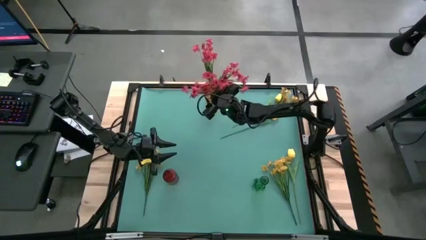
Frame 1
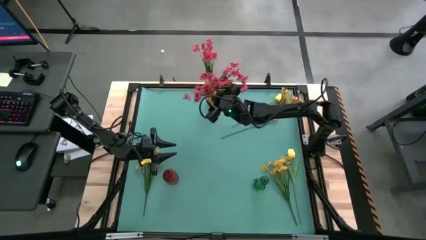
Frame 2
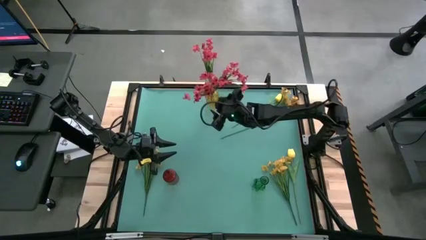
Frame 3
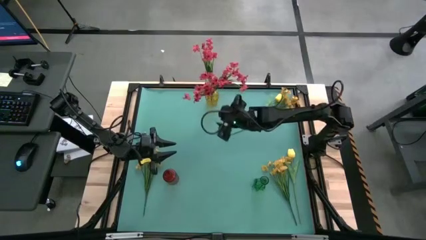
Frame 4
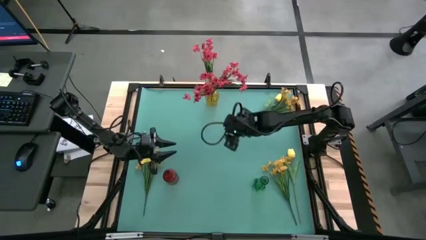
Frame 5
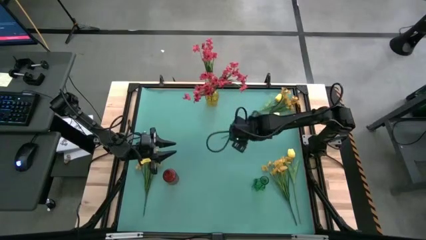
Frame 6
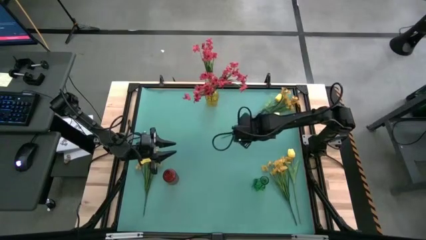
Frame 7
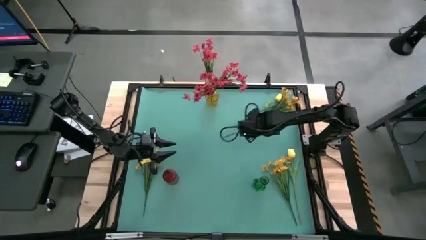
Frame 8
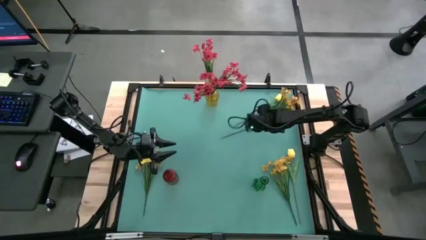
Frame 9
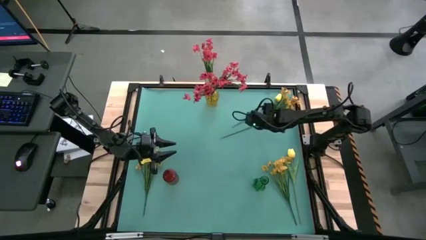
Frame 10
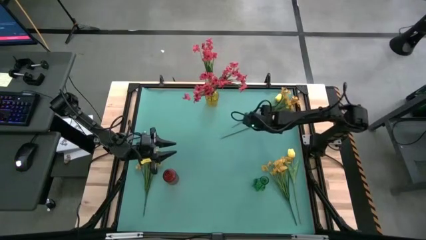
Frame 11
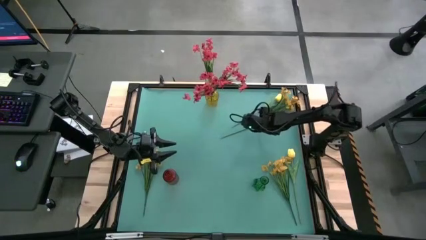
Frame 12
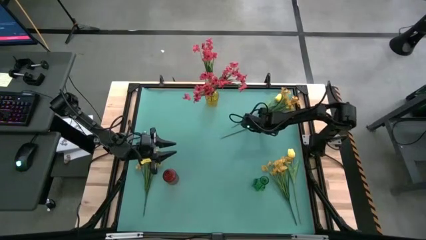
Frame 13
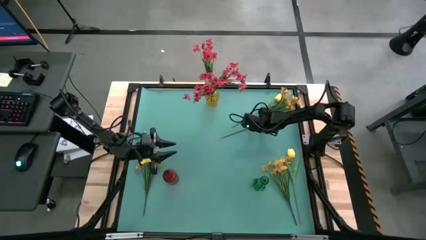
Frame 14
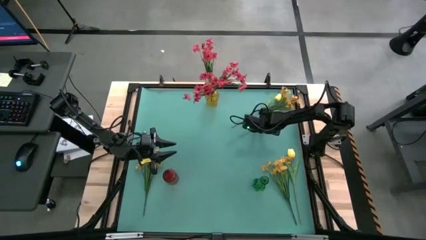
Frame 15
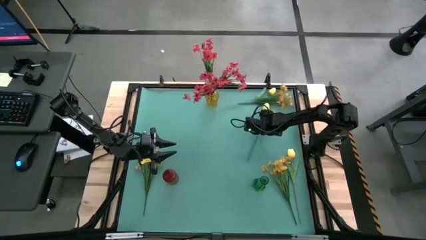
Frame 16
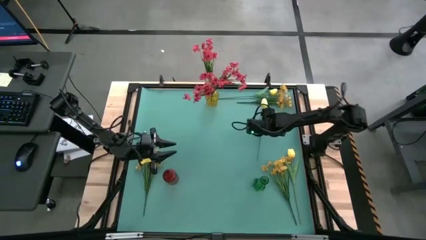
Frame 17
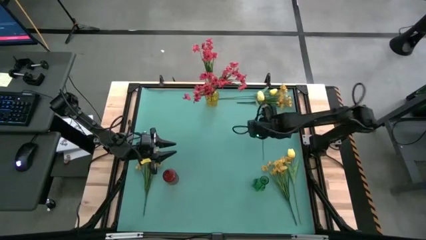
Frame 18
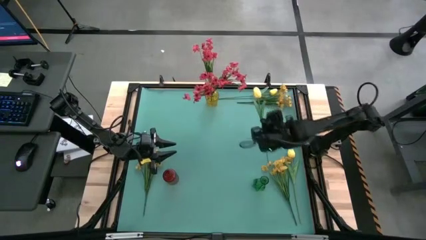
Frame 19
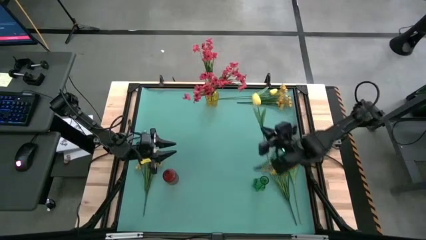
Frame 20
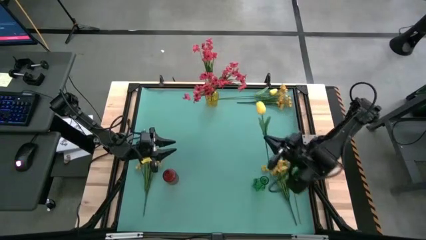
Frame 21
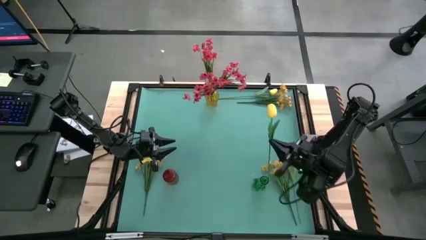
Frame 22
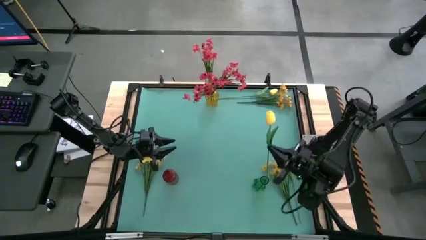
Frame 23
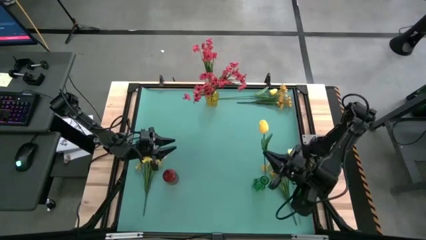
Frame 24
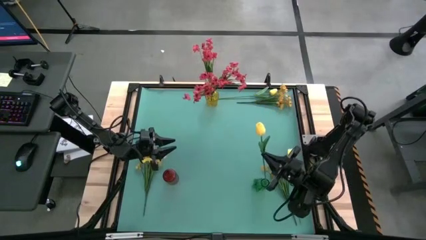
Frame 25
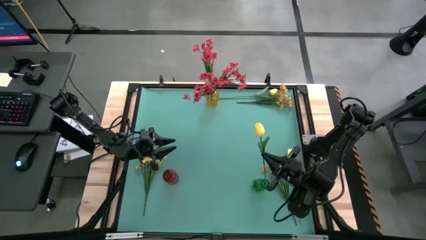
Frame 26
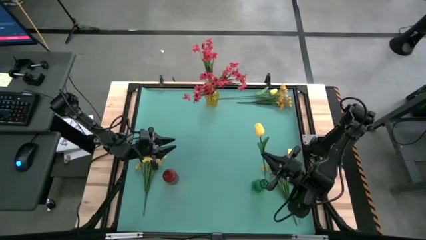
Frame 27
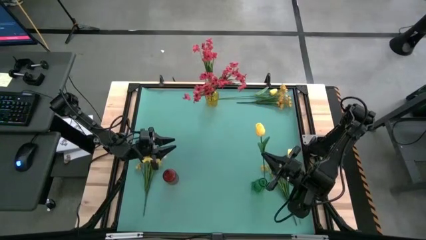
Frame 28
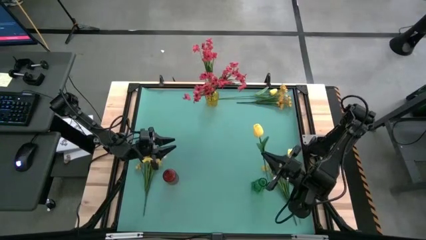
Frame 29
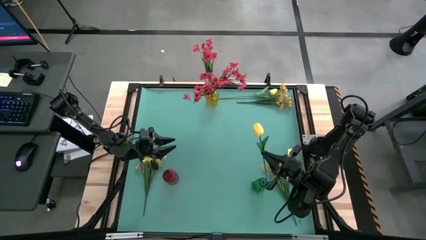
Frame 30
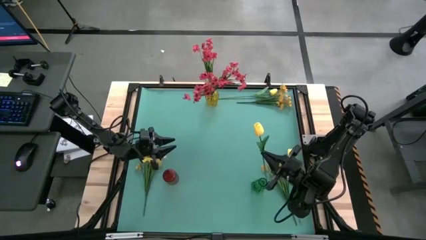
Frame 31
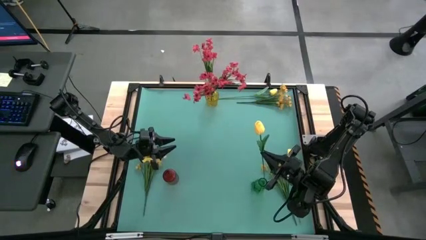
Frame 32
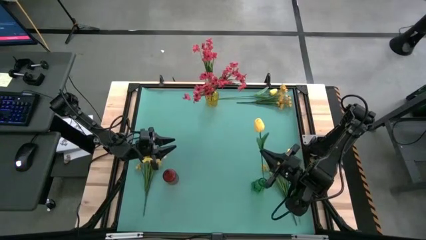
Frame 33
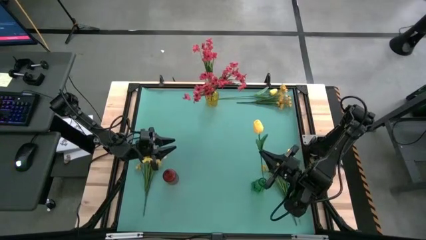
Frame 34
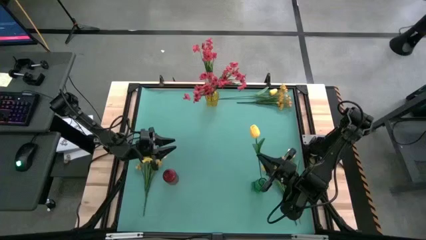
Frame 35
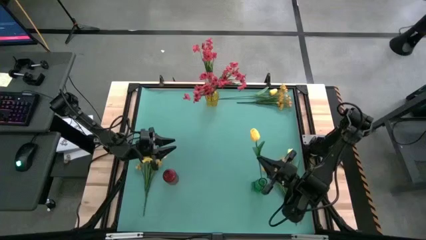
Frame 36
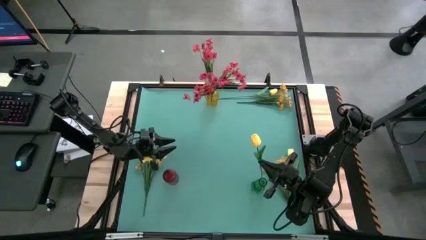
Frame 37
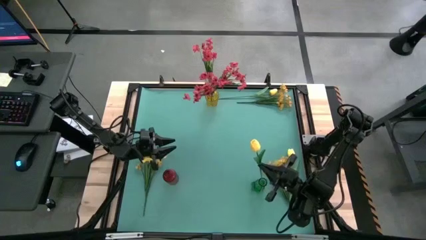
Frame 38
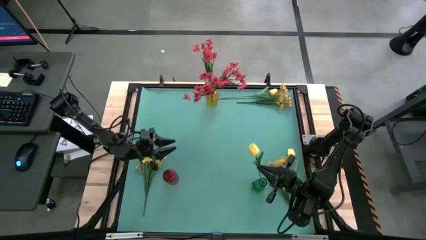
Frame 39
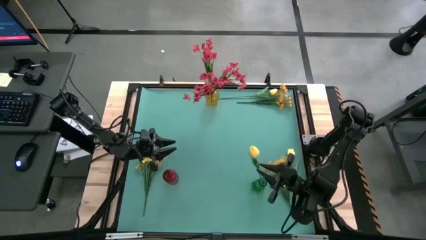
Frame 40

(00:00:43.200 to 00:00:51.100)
Task: Sort flowers into vase by color
Put the middle yellow tulip into the green vase

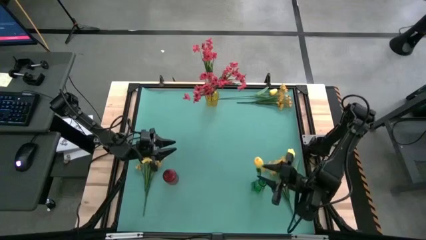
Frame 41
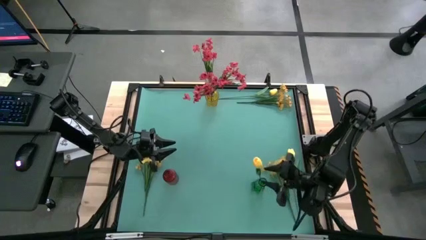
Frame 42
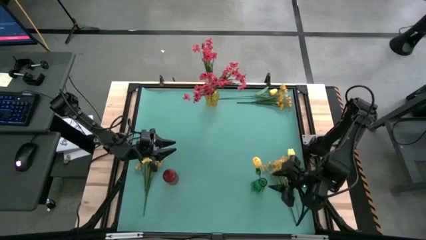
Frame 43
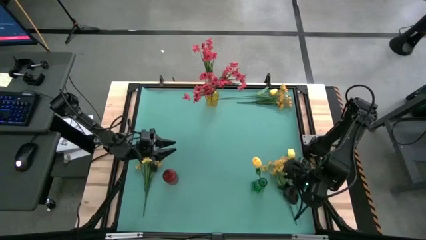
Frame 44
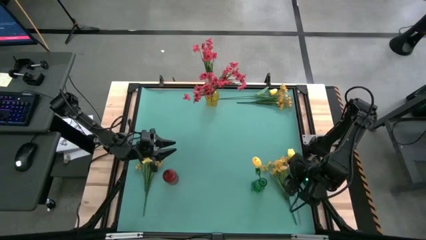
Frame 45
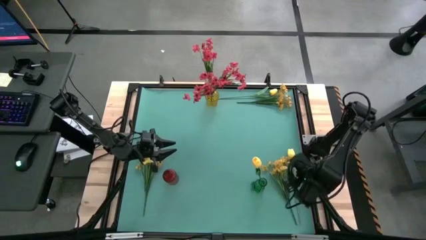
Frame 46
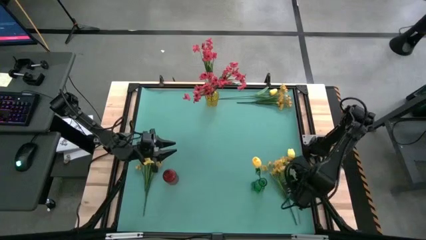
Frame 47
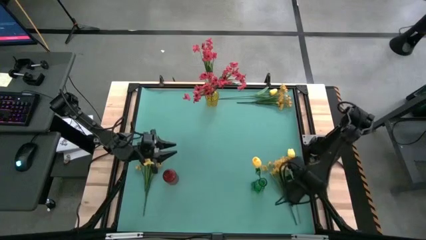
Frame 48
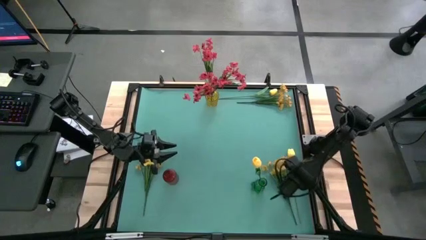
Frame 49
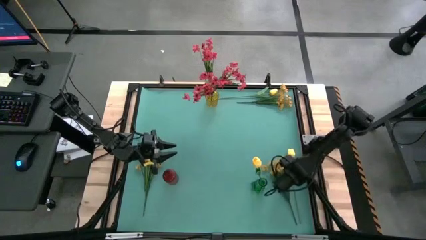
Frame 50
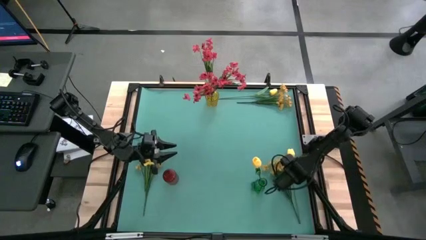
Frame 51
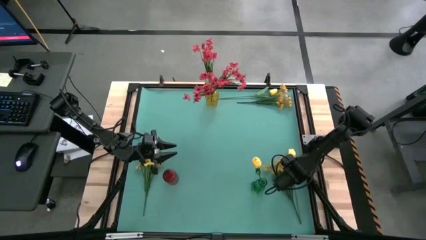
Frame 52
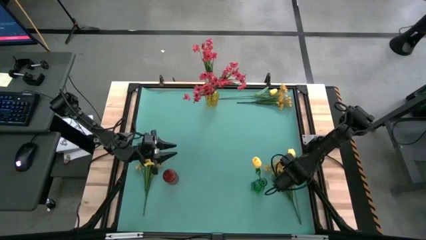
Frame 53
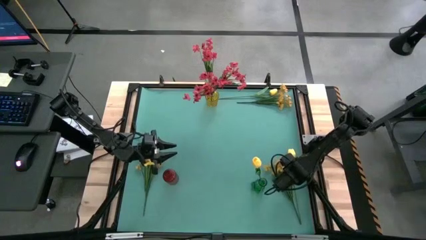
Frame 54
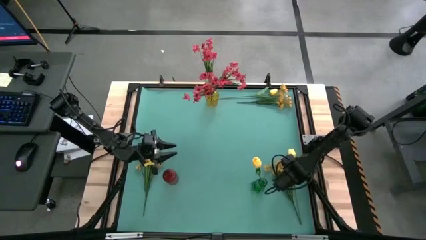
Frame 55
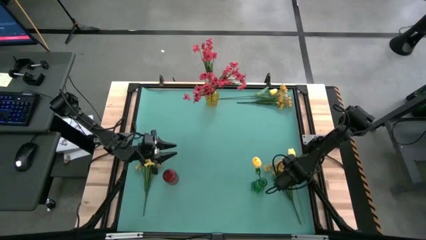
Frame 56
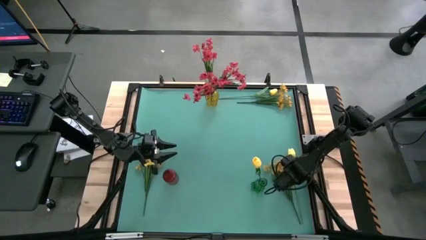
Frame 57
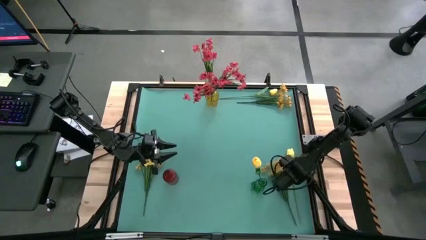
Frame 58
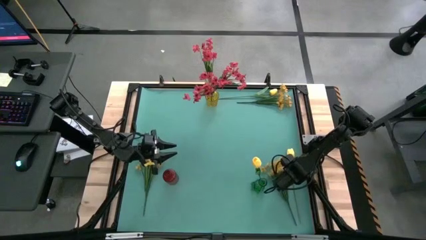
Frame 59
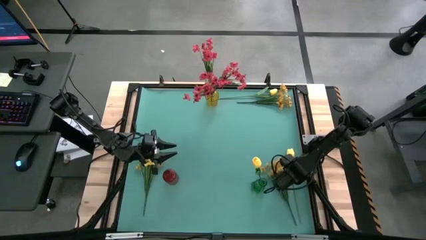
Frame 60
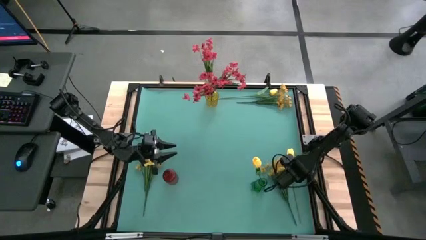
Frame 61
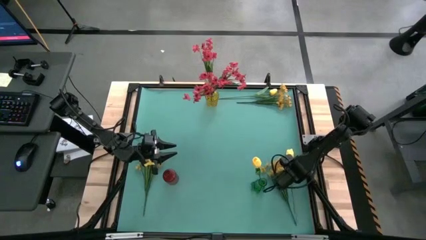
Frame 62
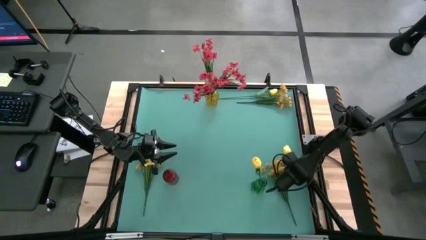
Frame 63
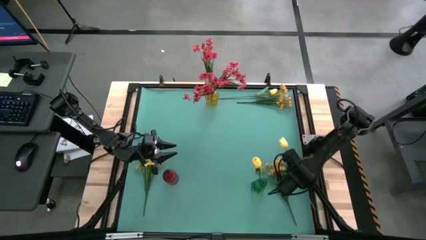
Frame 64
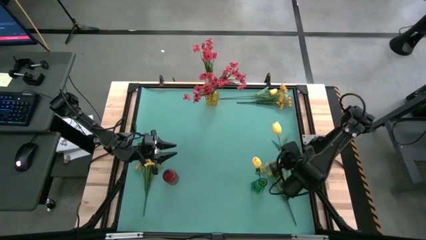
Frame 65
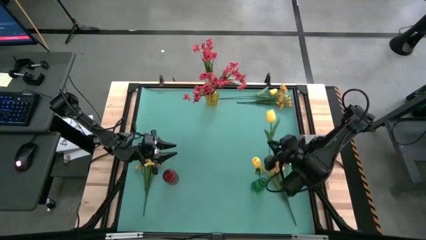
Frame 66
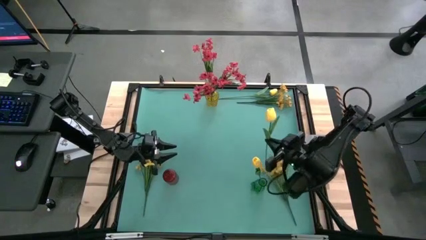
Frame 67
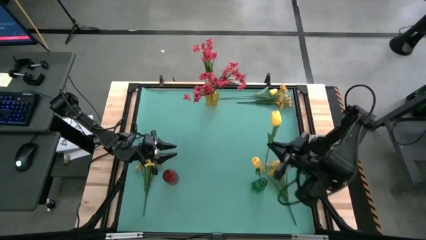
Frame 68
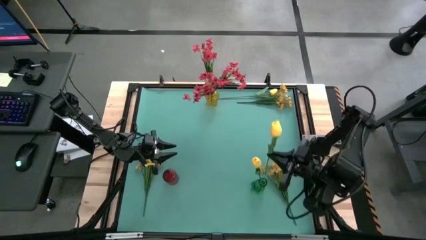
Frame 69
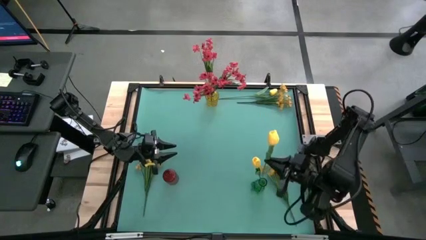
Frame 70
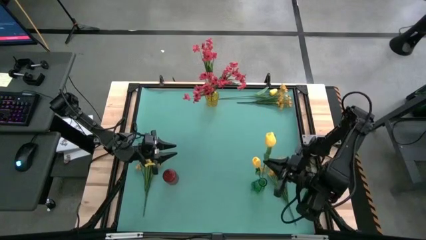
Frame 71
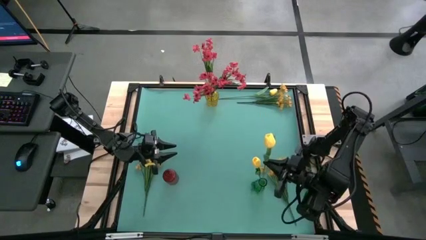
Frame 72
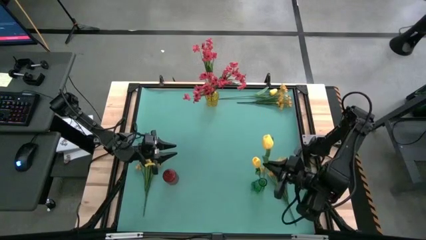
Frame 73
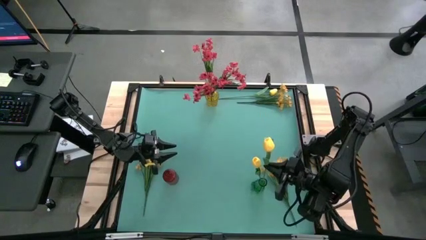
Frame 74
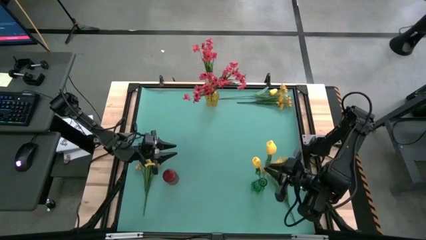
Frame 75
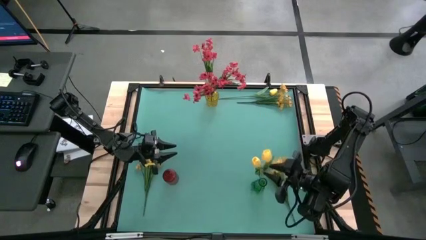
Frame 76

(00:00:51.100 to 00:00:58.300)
Put the bottom yellow tulip into the green vase
